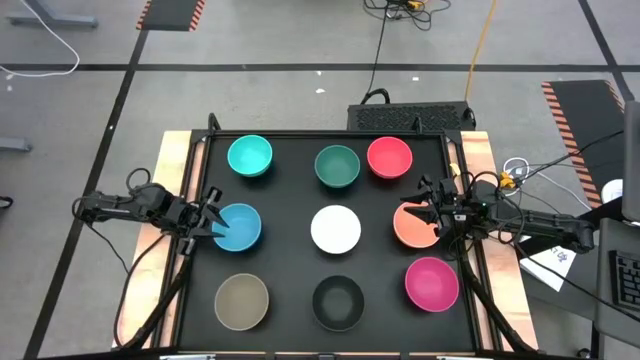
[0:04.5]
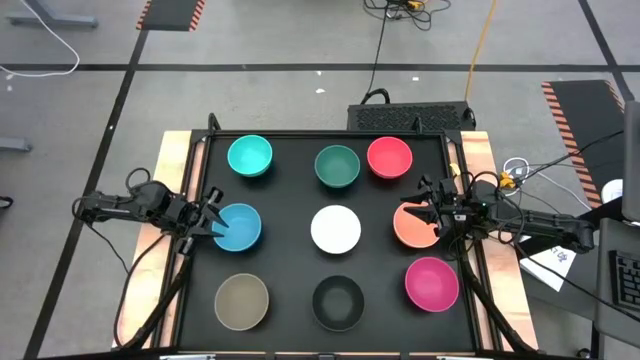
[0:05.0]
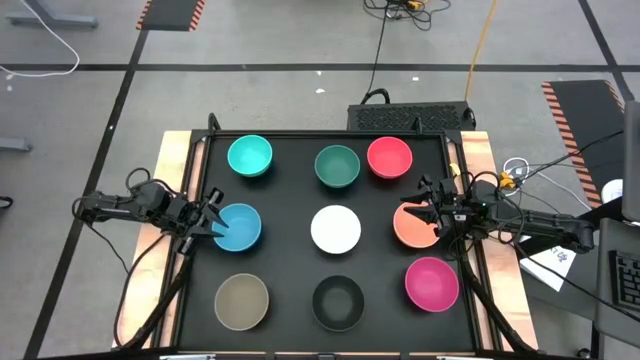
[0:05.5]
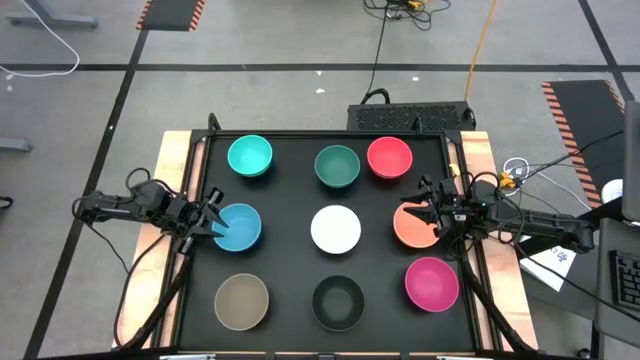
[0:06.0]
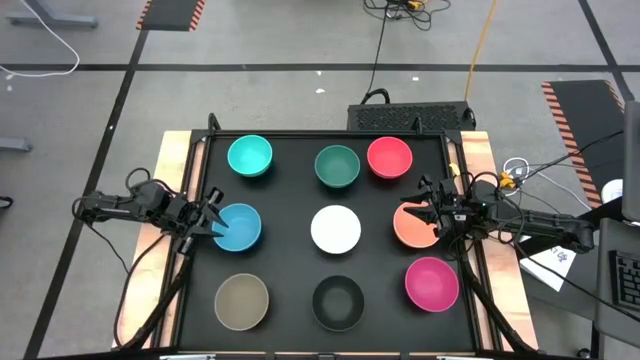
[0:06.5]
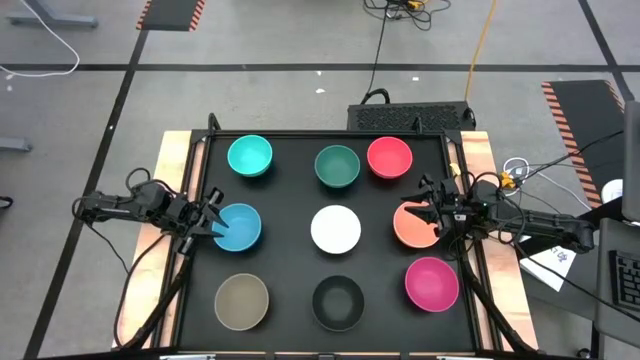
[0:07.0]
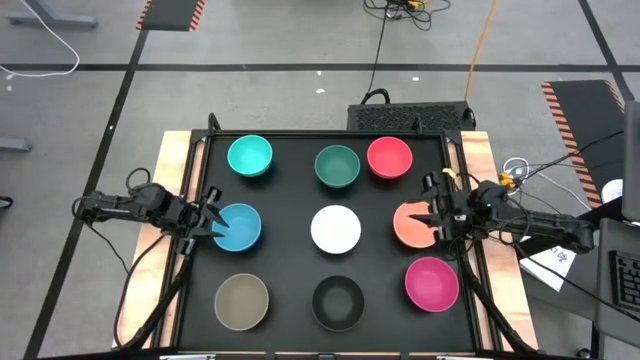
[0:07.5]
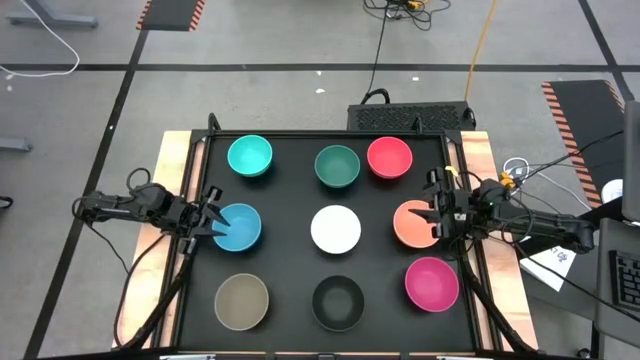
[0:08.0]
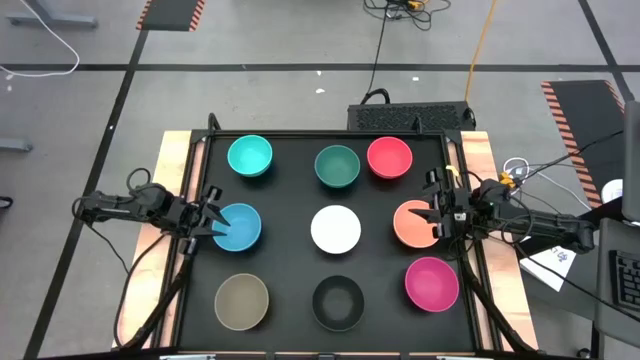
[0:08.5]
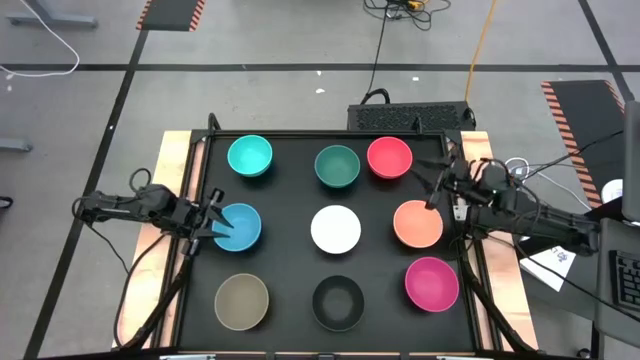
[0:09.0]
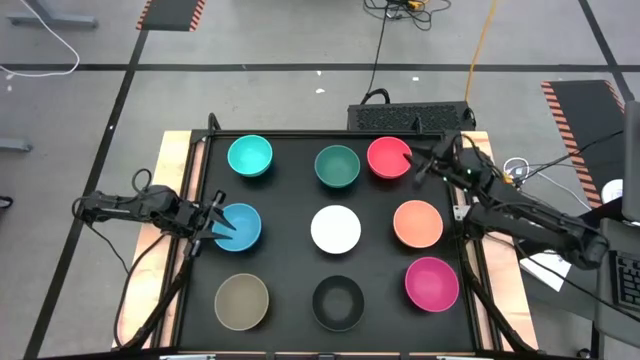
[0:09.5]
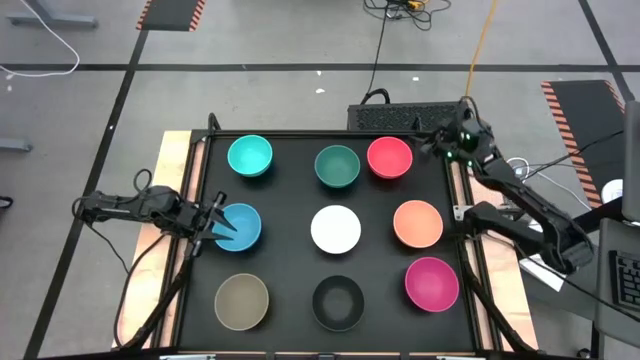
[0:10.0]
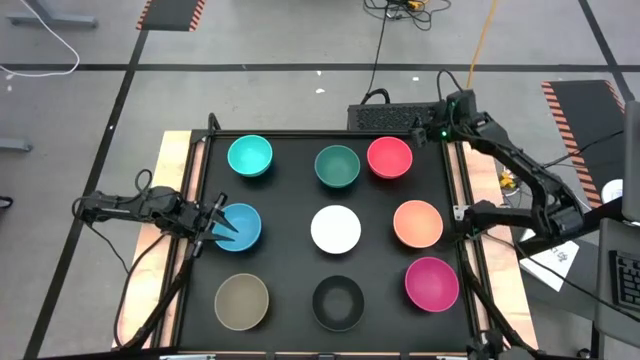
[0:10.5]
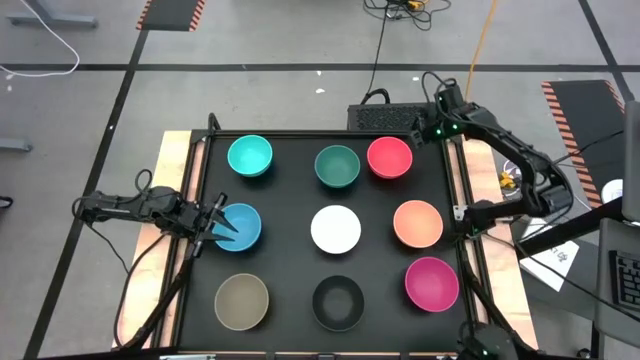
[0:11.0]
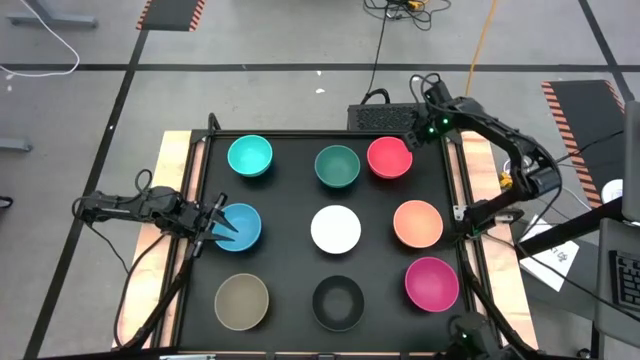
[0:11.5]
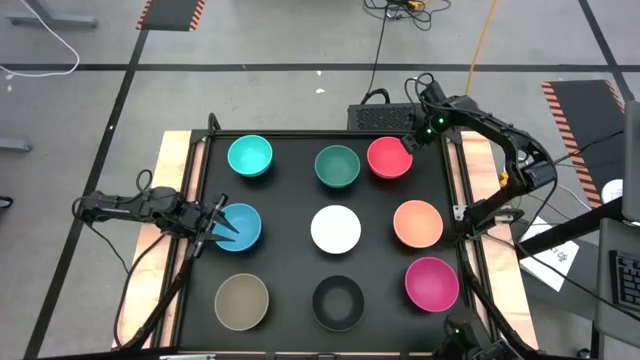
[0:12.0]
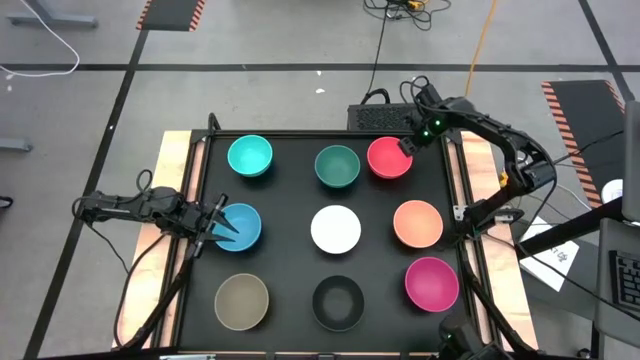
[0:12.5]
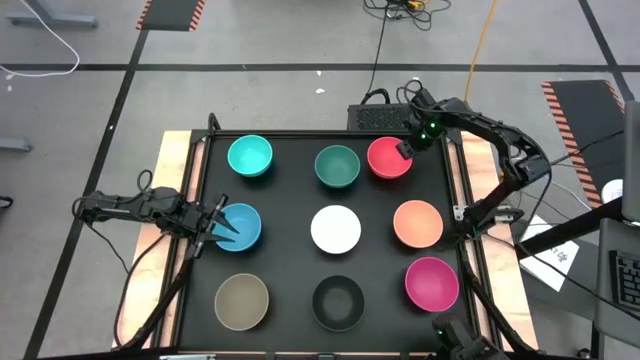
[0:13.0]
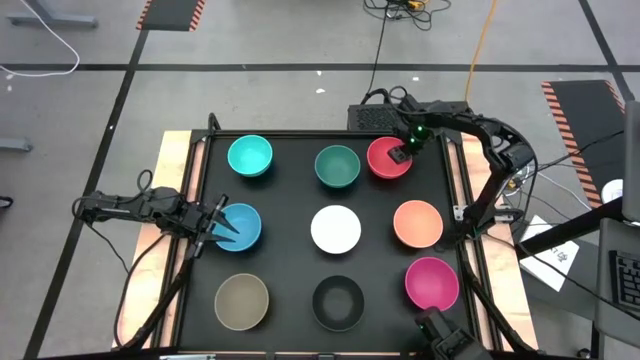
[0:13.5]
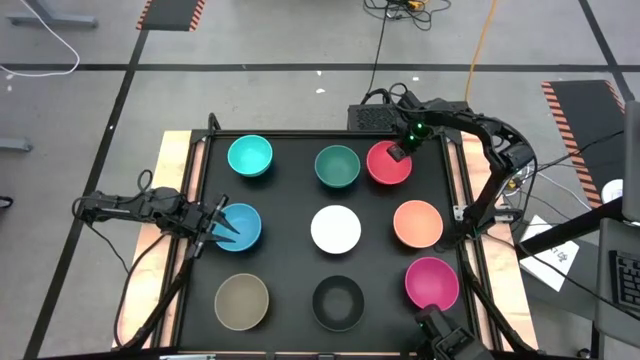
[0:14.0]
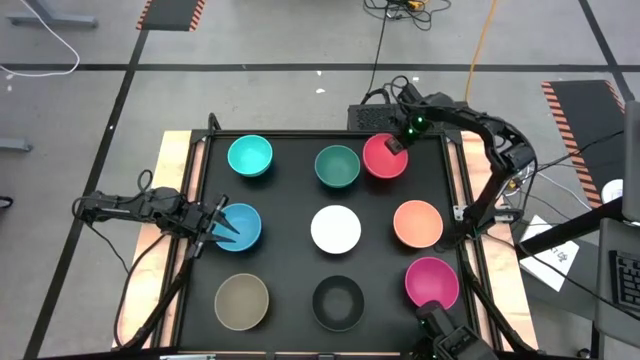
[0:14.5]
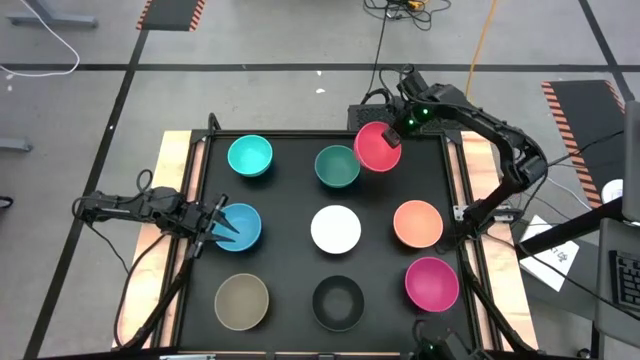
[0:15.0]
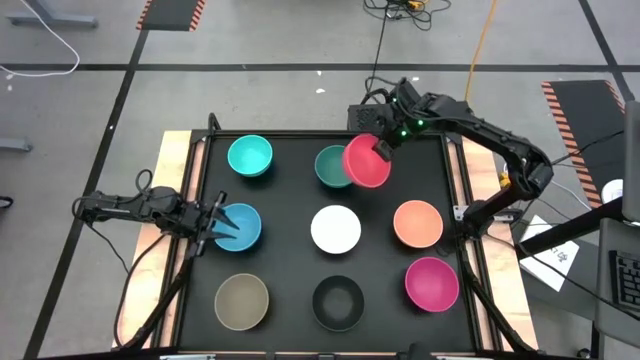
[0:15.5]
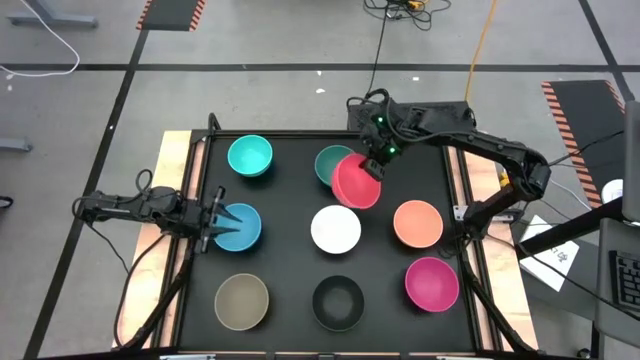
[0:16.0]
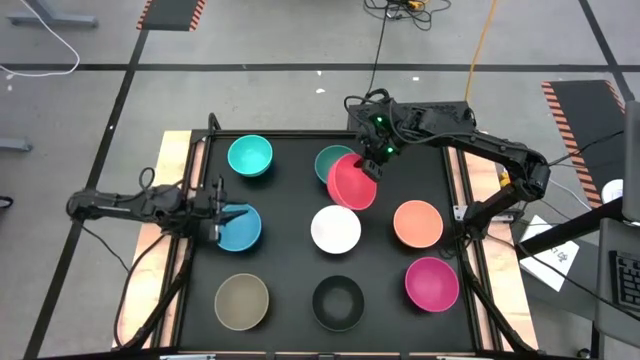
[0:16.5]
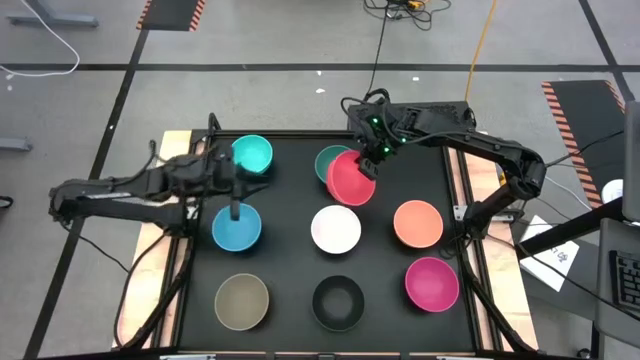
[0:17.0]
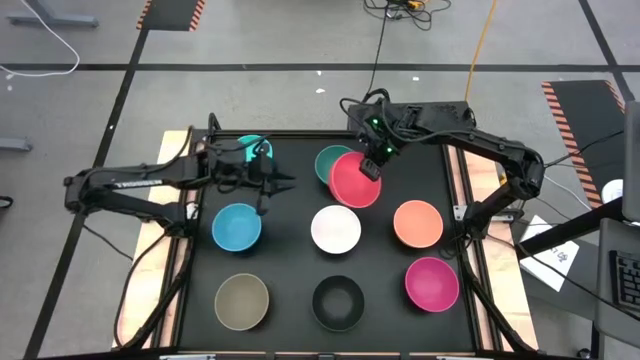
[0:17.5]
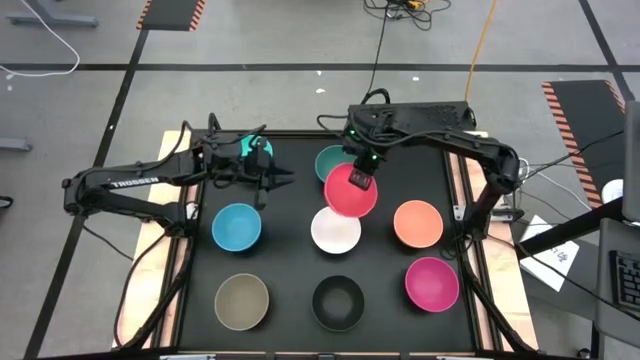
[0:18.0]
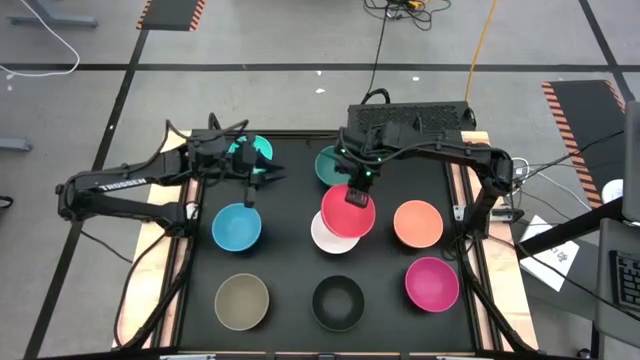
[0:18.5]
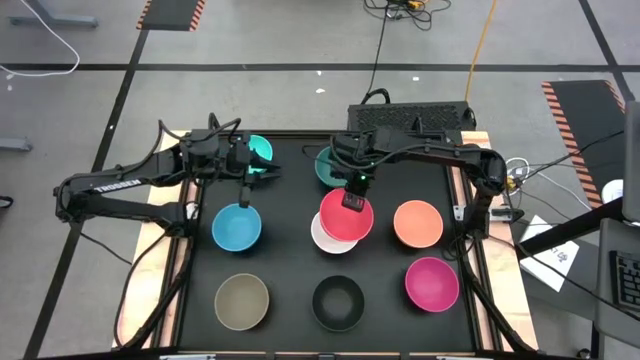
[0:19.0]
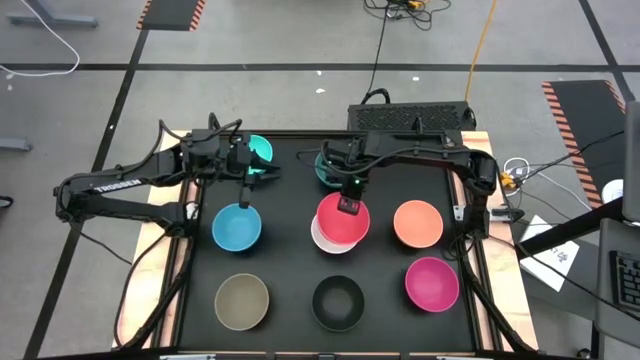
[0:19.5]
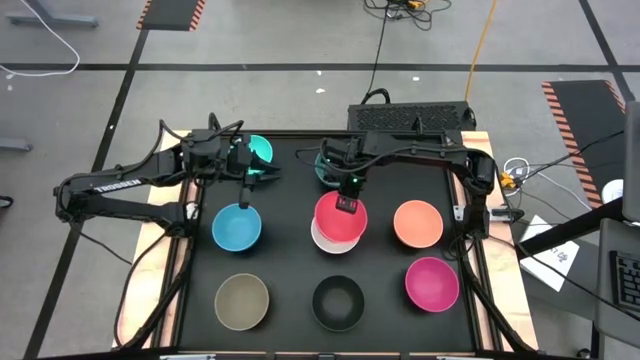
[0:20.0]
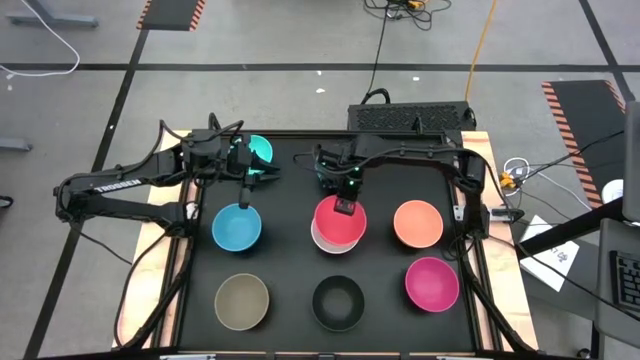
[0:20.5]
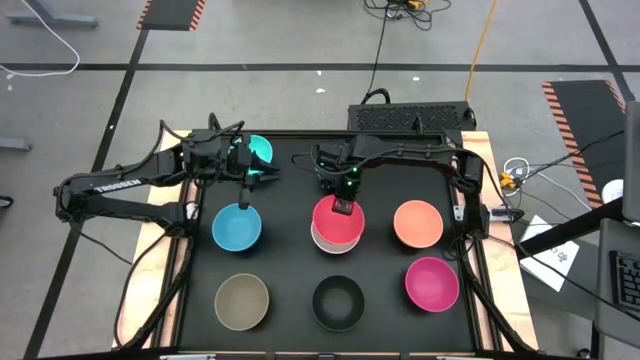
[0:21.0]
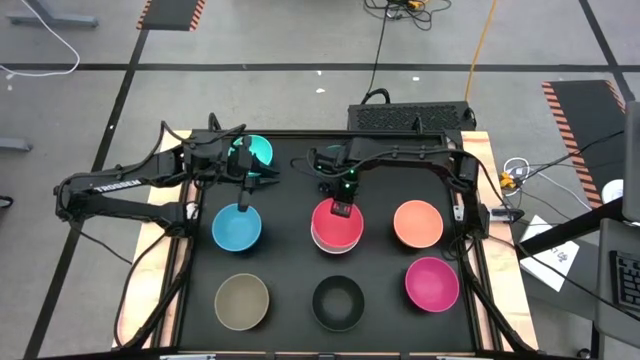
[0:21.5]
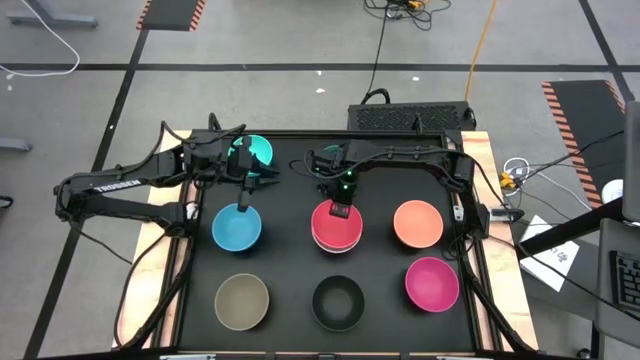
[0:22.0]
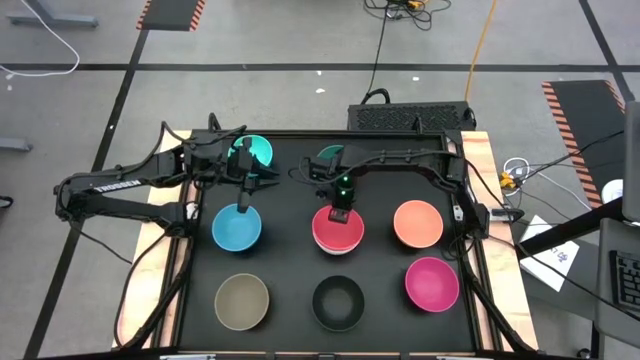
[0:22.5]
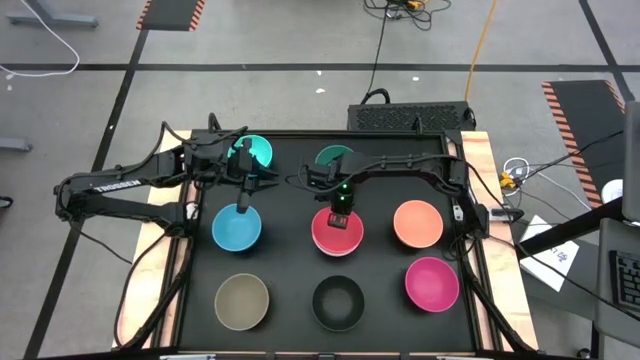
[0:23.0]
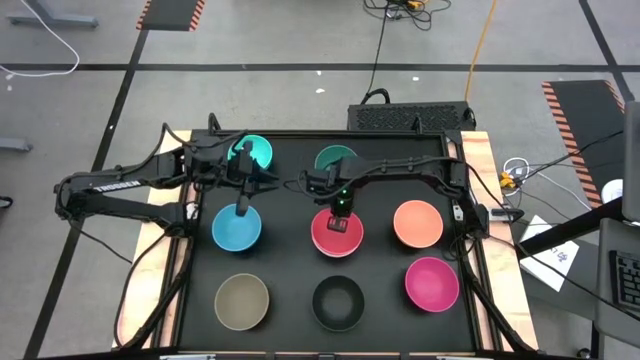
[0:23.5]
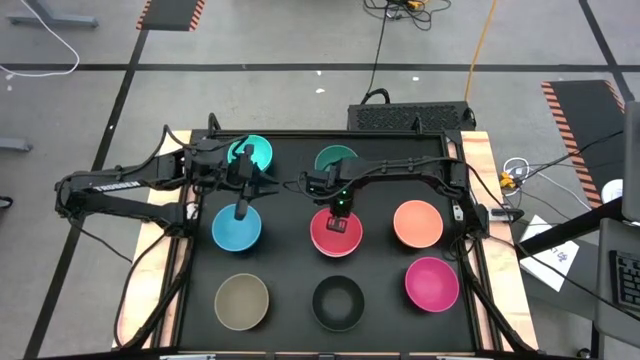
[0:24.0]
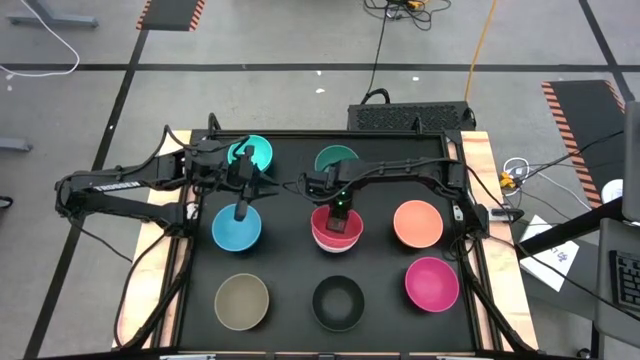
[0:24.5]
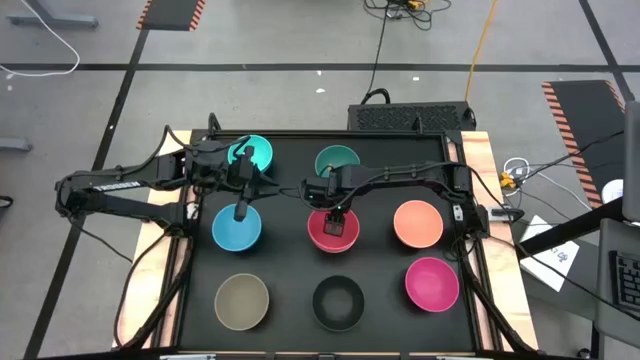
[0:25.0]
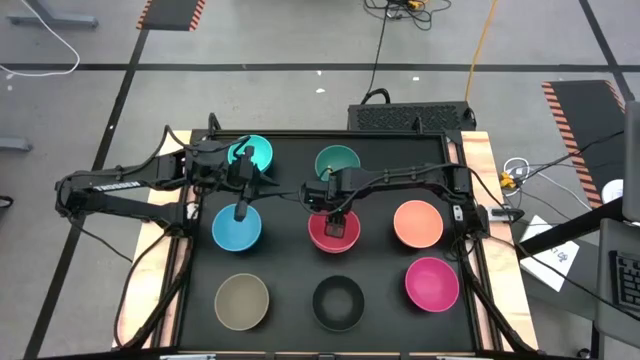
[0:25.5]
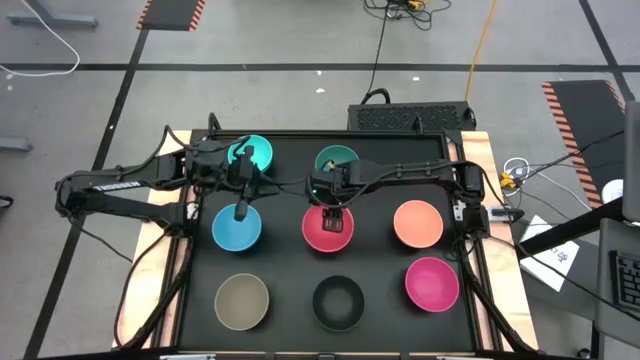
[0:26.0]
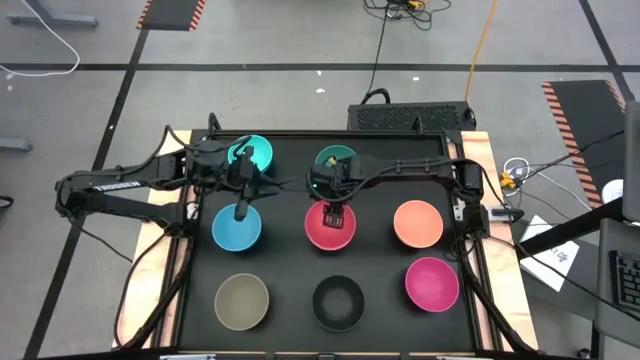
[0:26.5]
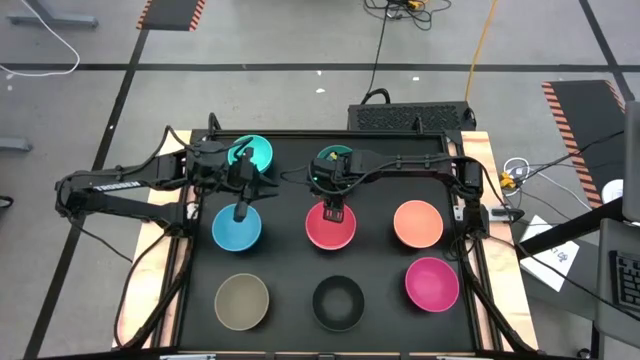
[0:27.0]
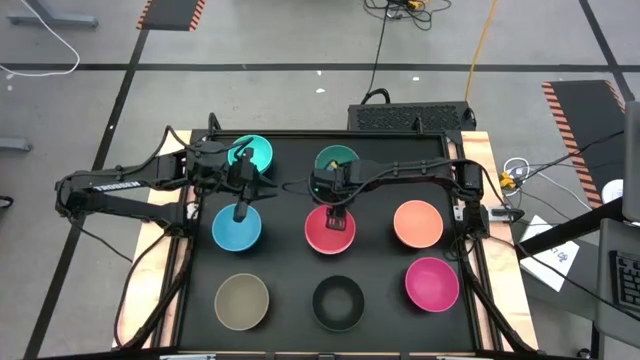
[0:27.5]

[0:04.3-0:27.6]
Task: Nest bowls inside each other
Stack the orange bowl on top of the white bowl
